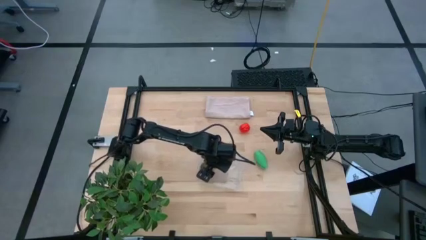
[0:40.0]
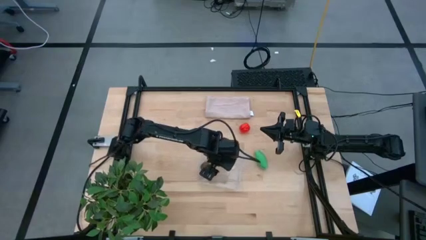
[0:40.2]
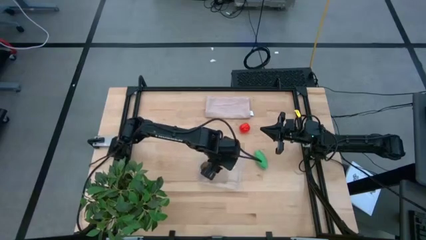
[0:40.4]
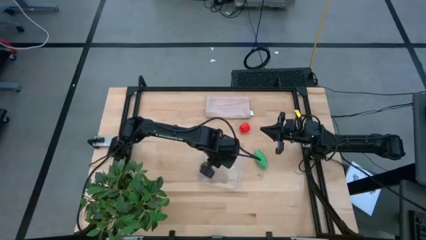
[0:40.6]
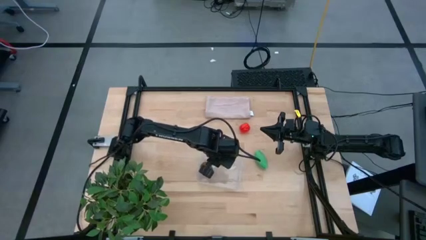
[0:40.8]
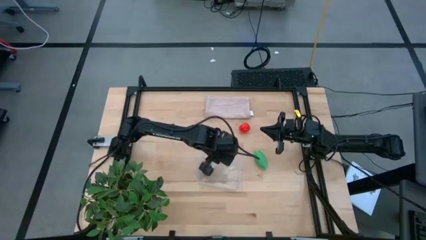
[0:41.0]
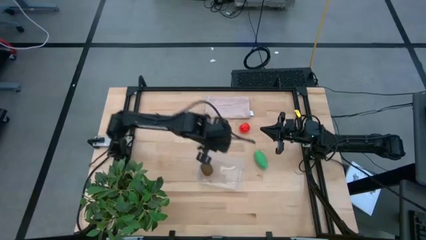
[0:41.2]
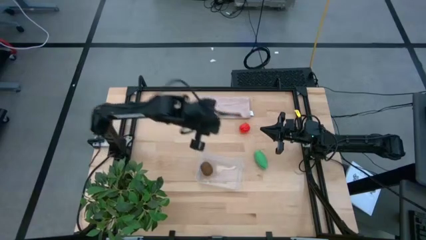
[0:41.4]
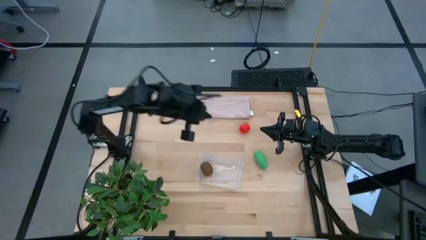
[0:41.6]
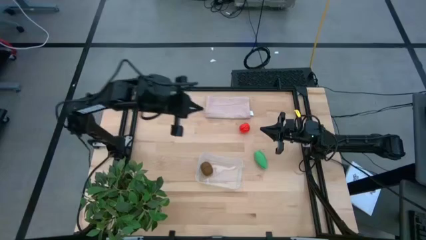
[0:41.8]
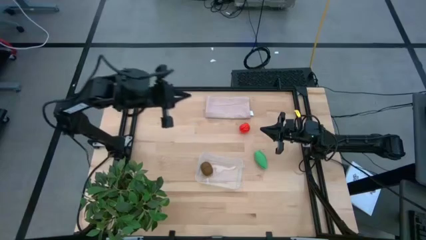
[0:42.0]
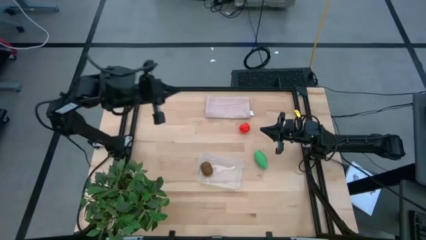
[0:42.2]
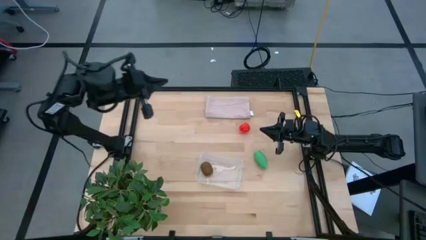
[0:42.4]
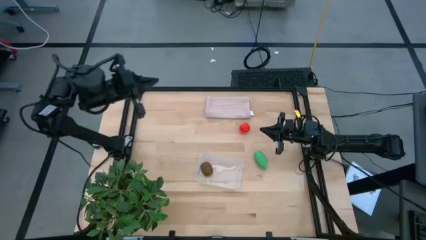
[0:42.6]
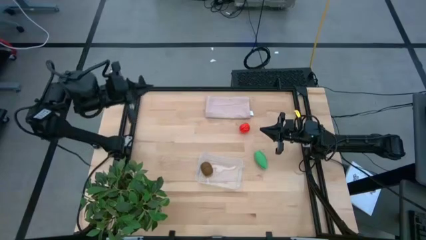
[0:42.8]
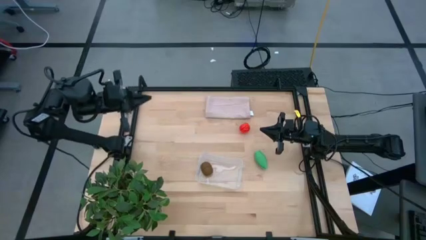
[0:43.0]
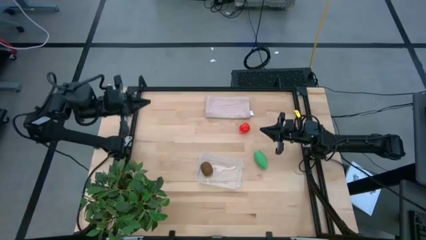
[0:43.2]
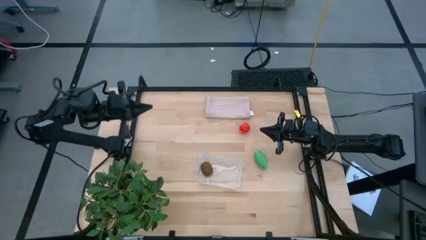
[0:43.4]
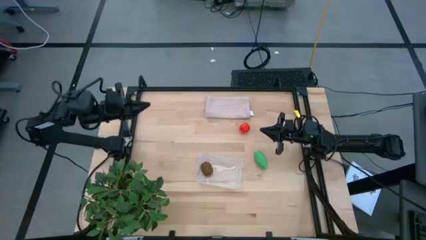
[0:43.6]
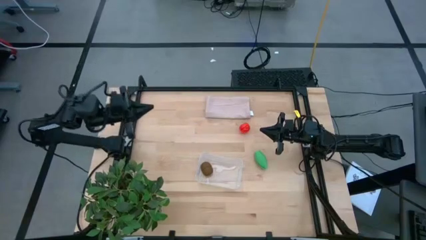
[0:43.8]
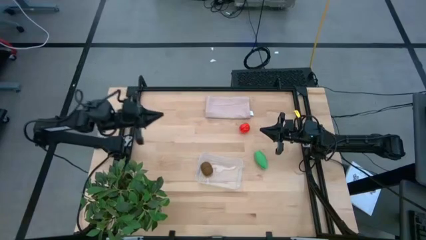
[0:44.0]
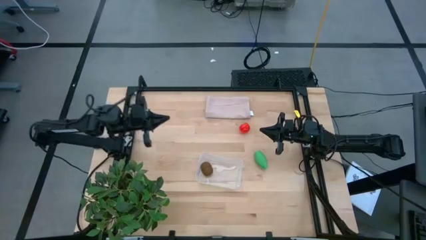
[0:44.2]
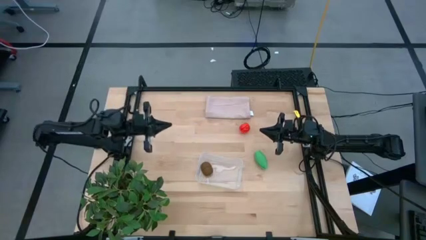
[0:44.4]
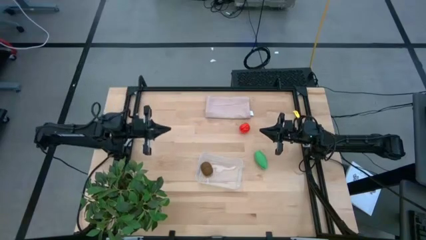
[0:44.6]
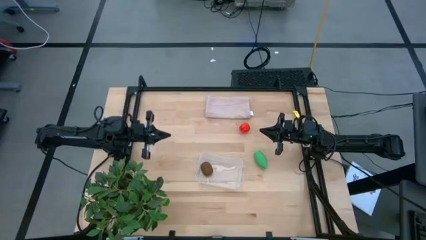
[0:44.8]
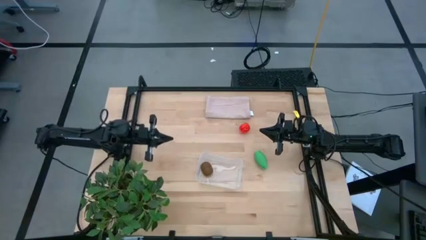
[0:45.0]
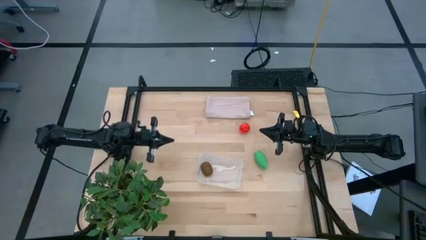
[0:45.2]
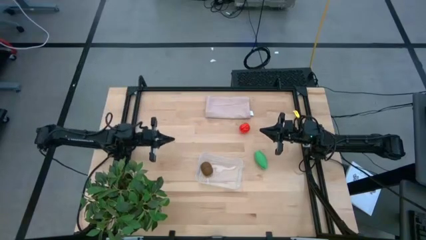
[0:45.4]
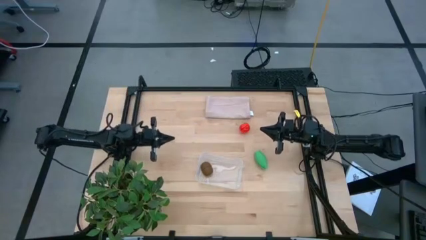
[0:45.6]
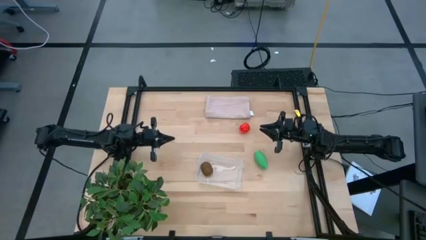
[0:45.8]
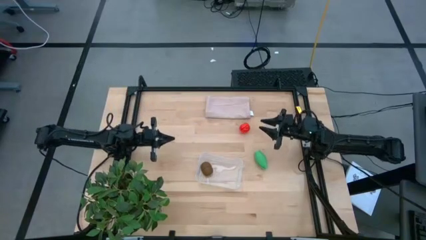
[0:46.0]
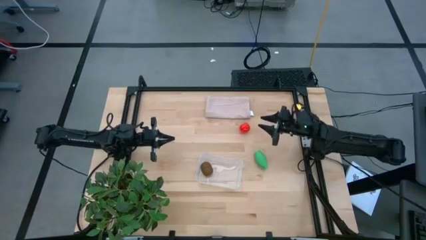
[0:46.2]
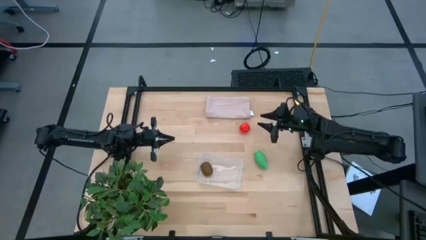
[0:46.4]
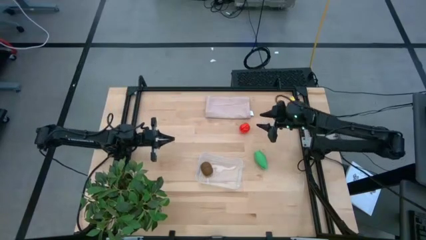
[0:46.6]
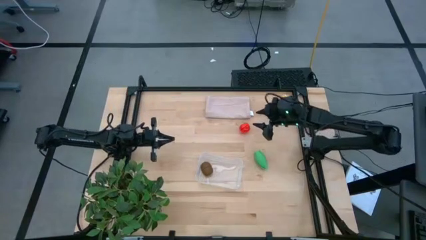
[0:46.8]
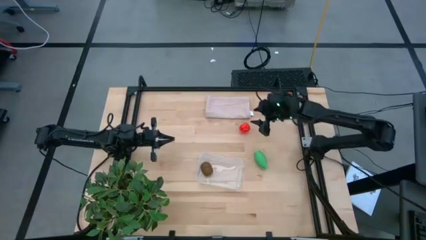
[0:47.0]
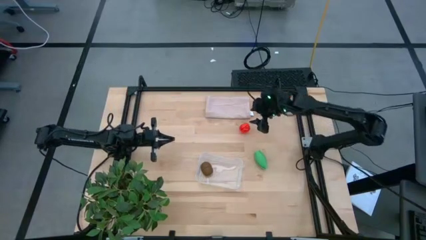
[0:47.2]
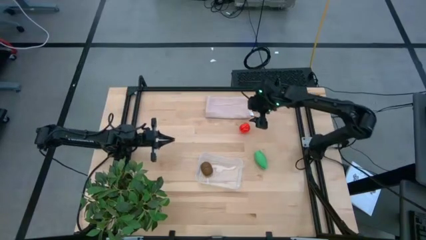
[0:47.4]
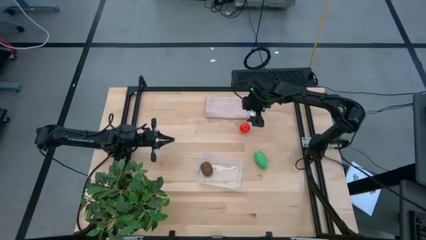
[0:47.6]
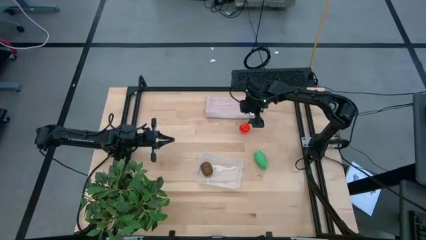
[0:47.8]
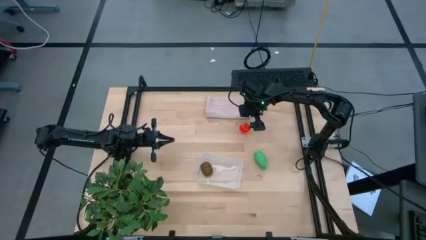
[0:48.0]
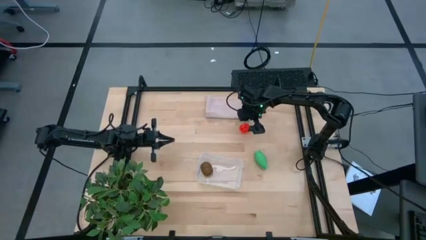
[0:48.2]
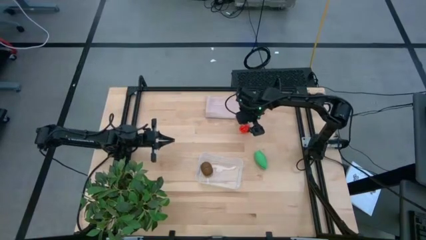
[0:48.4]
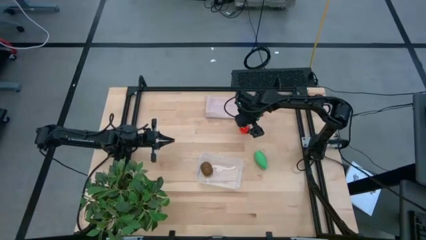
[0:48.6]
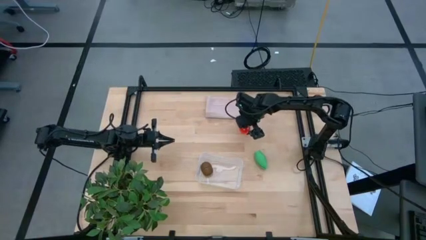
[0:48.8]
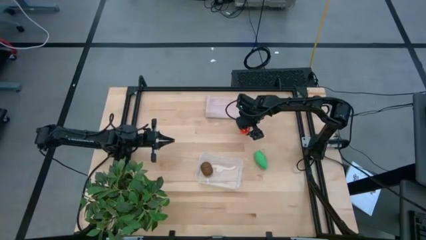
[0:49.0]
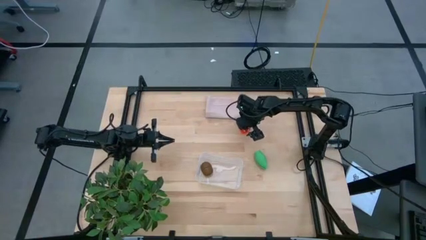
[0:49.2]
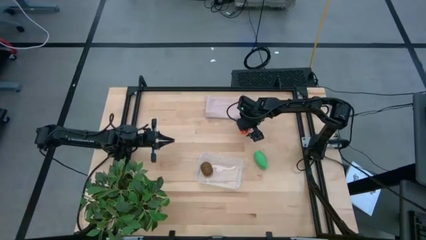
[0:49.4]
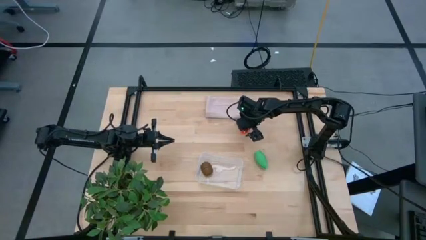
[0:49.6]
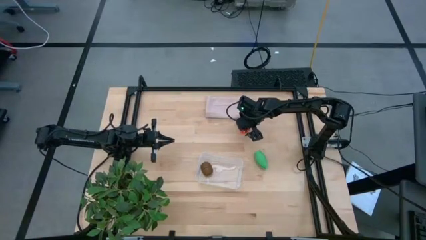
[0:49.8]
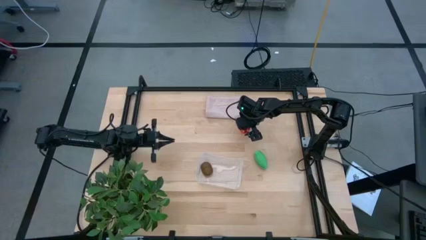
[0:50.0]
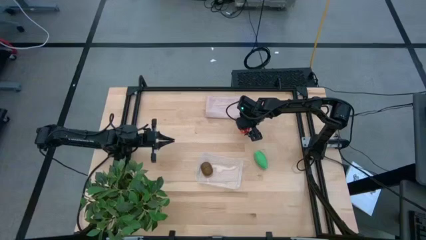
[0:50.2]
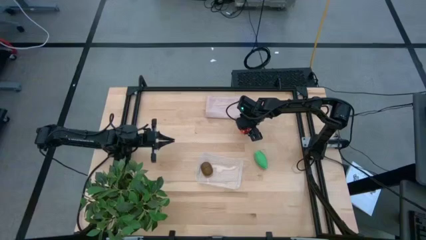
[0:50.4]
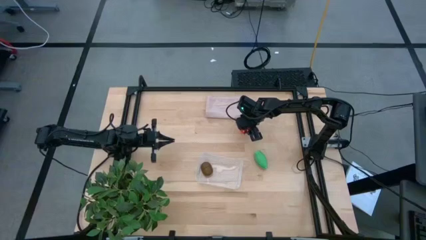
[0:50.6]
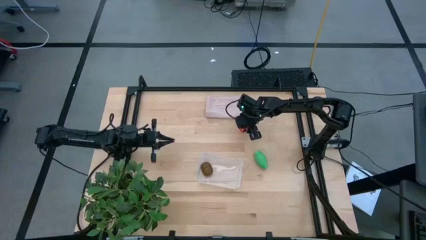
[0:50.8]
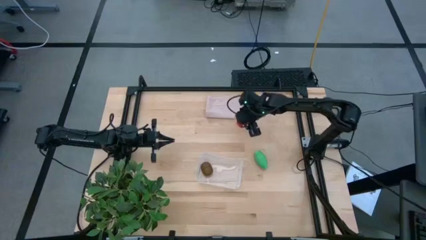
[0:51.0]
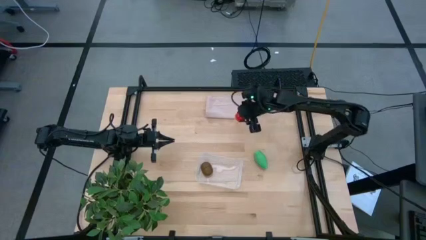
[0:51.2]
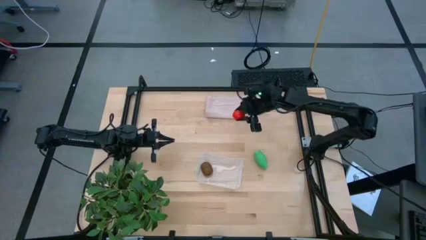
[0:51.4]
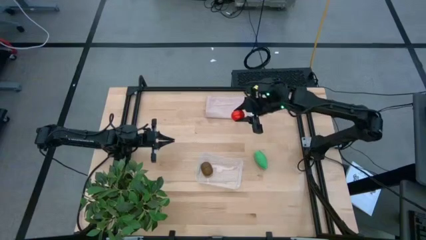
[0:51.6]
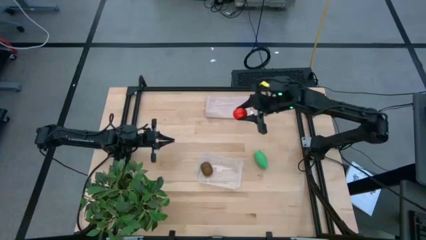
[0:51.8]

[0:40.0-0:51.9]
Task: Pick and placing Produce into tupperware
Put the tomato into the transparent bin

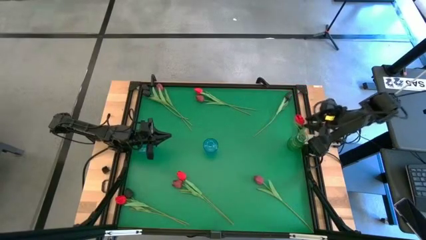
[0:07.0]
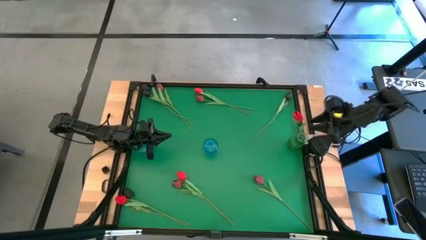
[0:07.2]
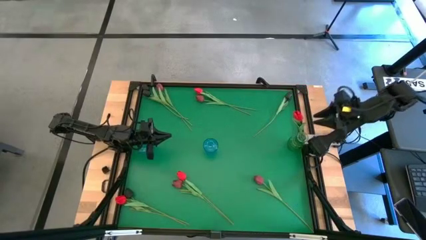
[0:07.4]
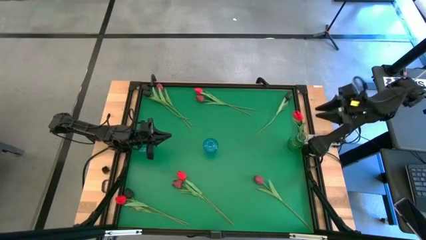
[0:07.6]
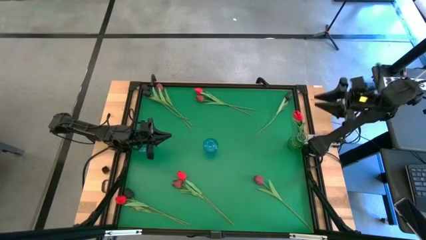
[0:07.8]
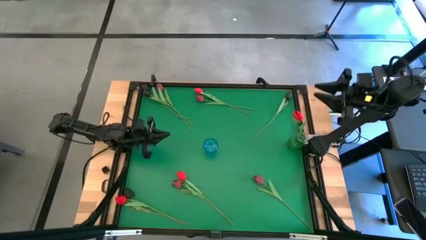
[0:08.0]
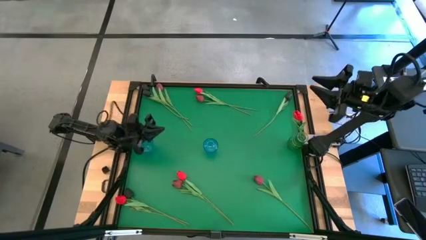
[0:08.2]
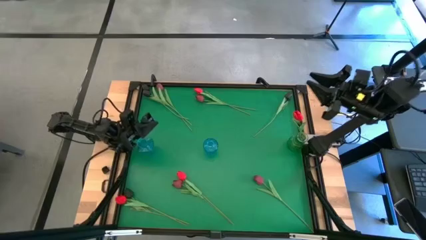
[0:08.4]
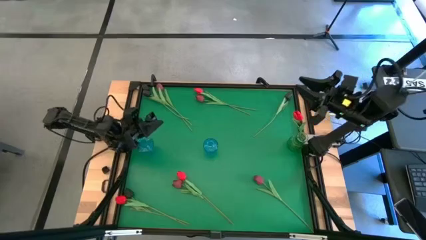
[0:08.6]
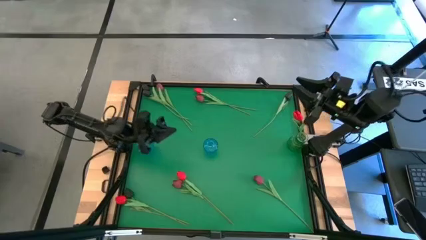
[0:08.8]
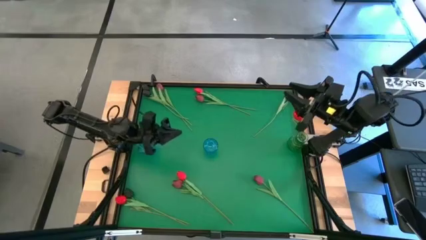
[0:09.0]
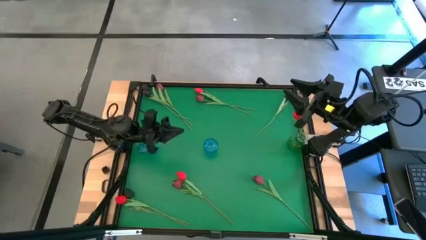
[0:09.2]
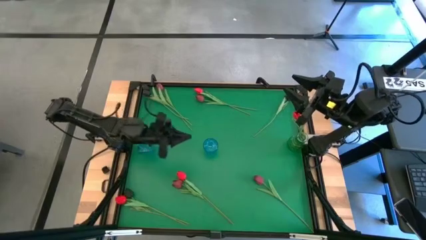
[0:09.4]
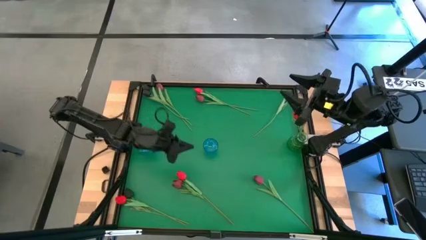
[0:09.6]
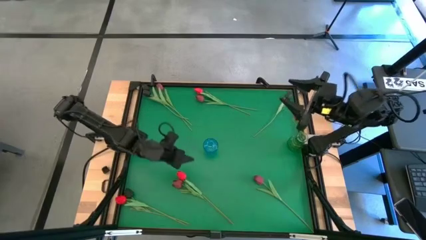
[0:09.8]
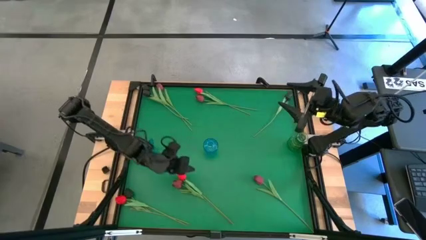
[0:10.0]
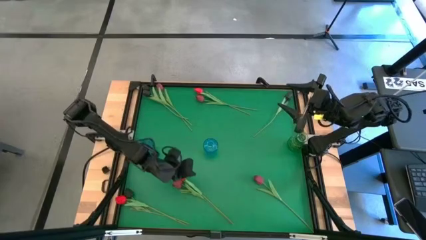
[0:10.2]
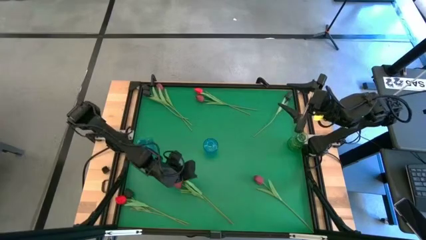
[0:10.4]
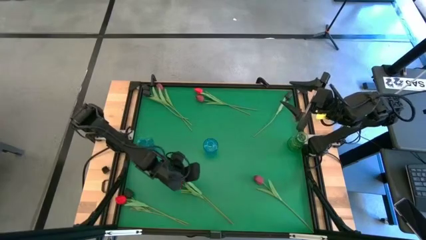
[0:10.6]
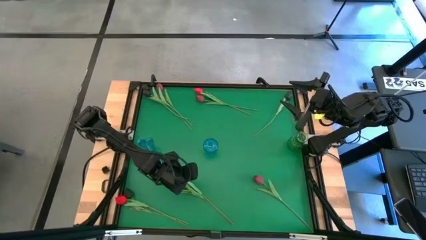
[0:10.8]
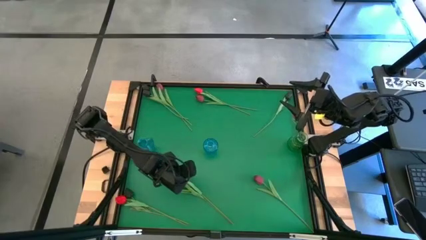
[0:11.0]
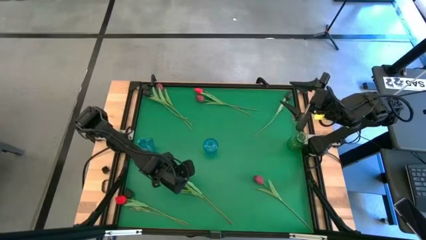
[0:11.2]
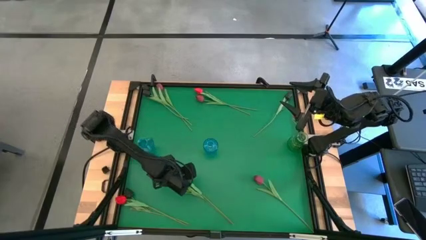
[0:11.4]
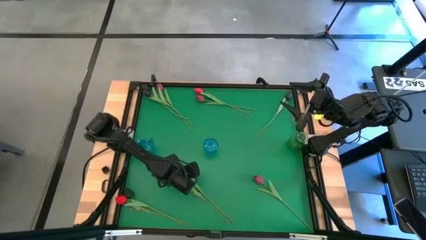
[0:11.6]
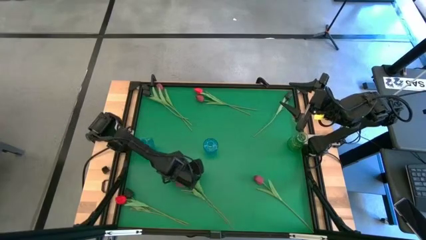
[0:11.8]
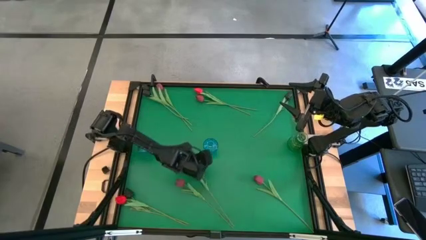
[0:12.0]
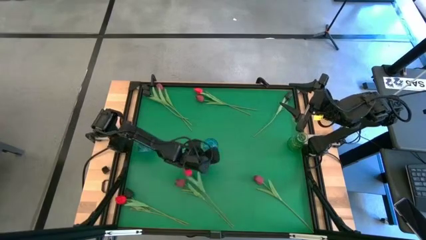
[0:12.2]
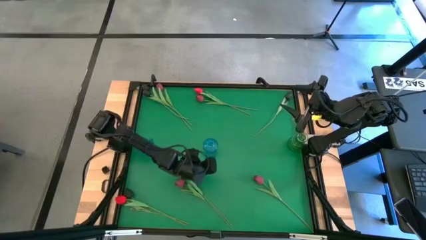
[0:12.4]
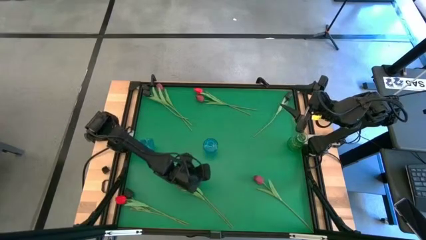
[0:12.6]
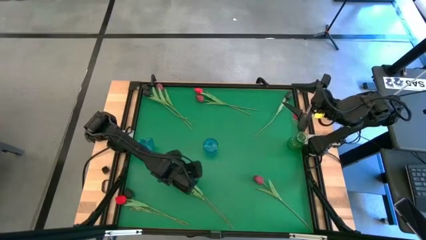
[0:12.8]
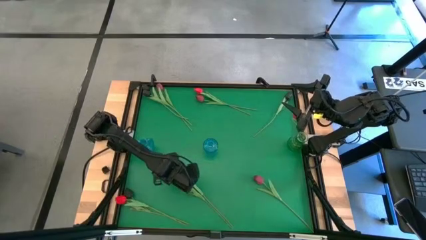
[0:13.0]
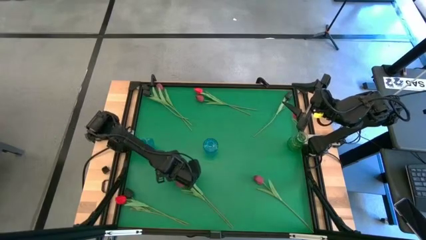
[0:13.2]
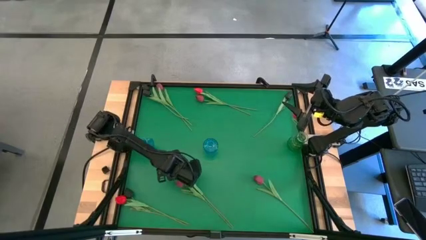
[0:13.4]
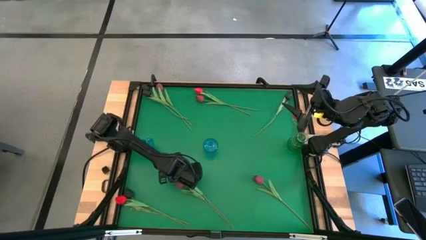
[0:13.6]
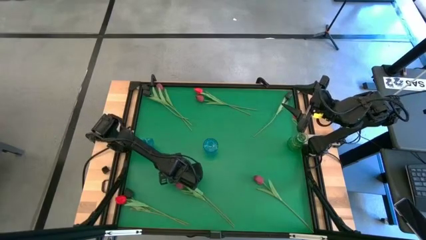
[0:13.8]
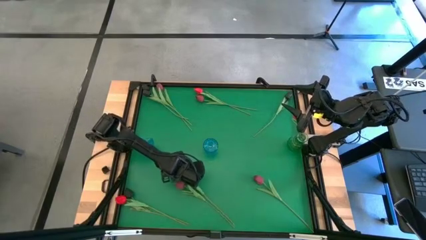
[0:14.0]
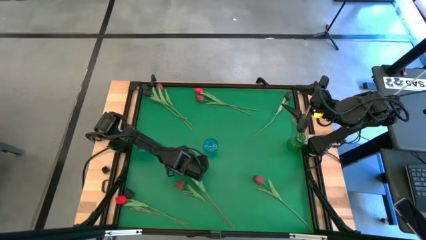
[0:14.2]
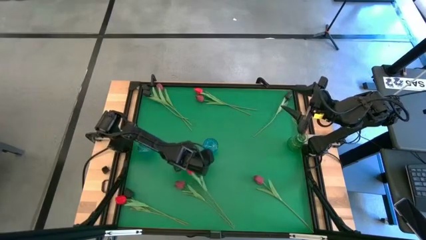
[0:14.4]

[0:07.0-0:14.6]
Task: Sort flowers into vase by color
Put the pink flower into the green flower vase
